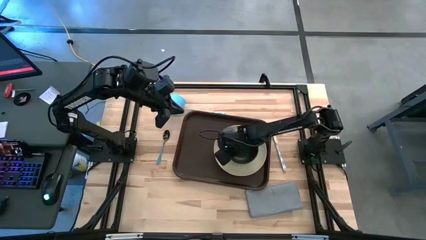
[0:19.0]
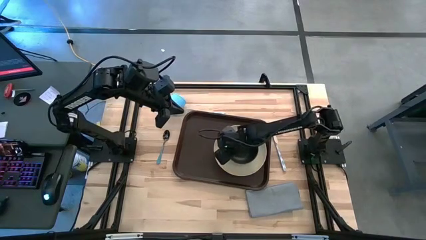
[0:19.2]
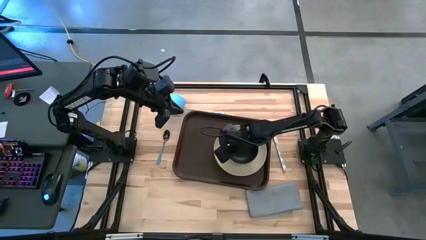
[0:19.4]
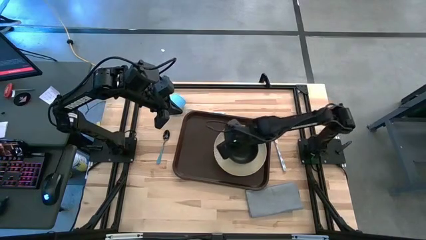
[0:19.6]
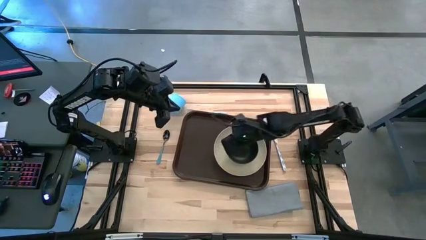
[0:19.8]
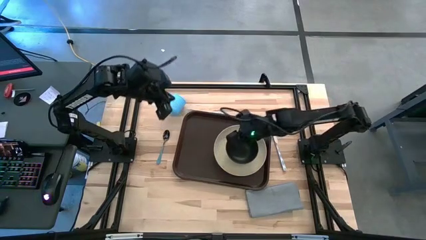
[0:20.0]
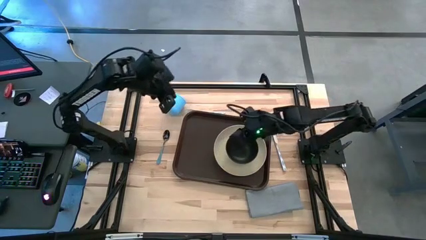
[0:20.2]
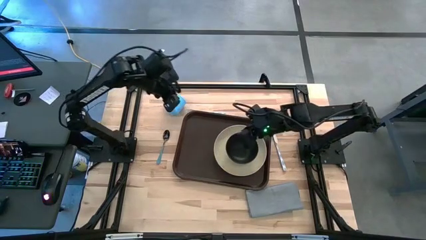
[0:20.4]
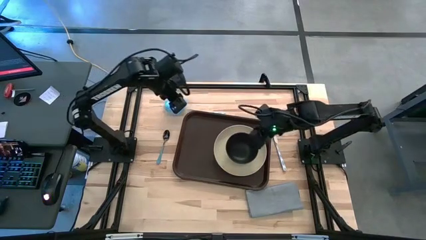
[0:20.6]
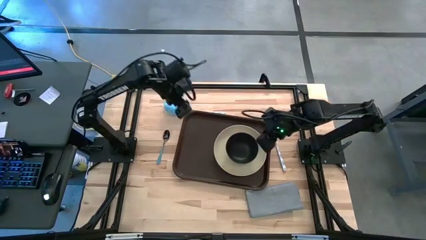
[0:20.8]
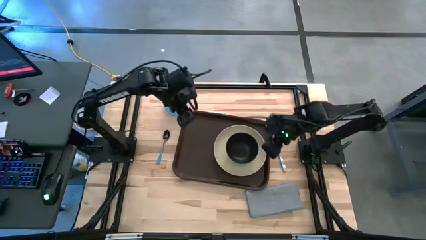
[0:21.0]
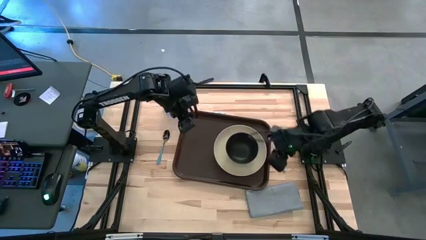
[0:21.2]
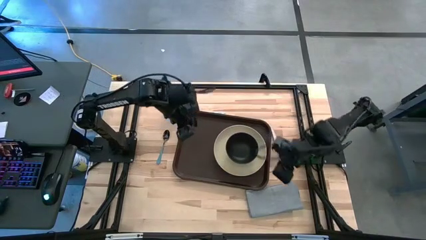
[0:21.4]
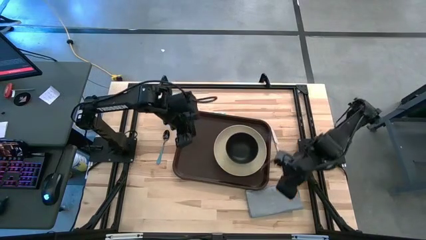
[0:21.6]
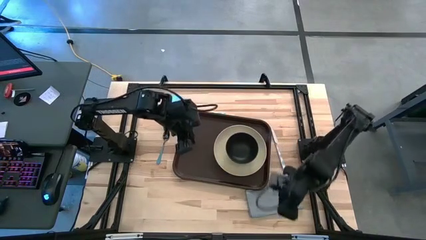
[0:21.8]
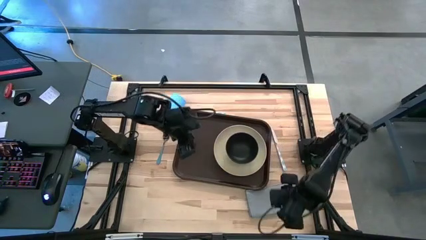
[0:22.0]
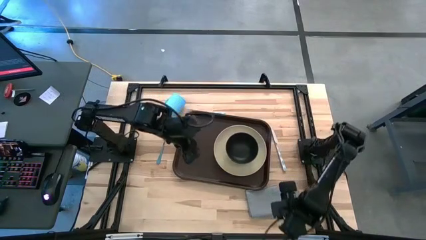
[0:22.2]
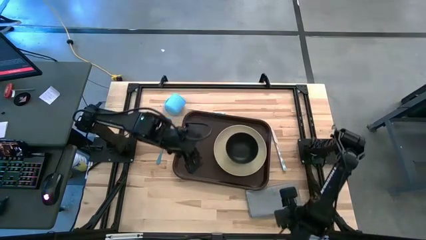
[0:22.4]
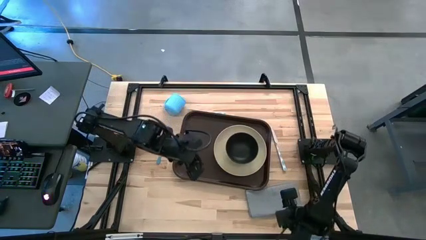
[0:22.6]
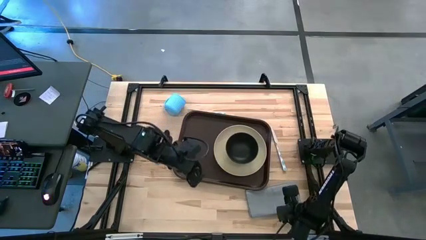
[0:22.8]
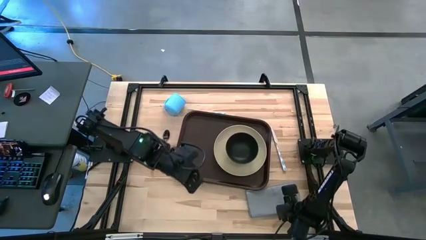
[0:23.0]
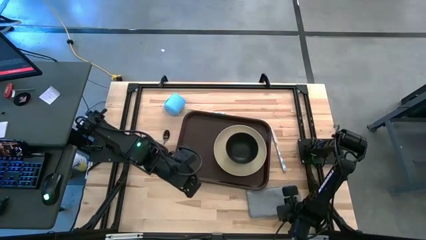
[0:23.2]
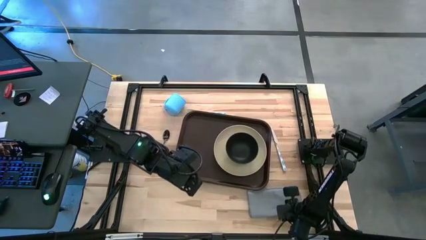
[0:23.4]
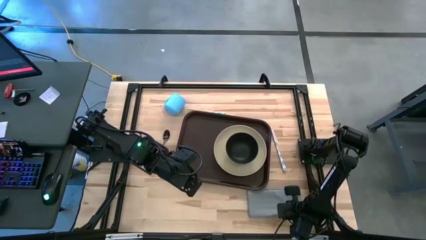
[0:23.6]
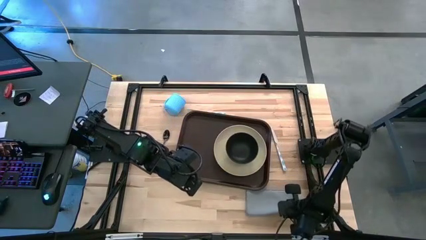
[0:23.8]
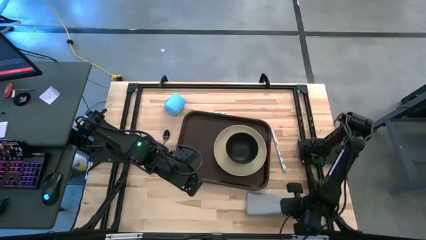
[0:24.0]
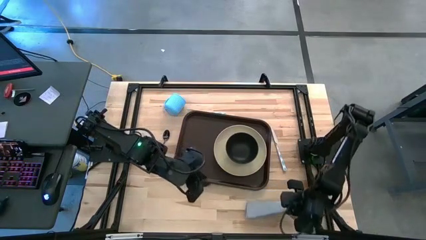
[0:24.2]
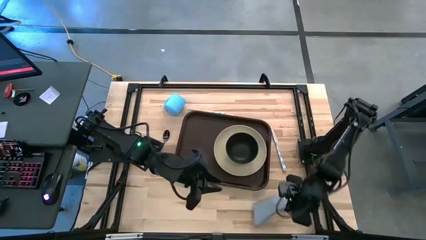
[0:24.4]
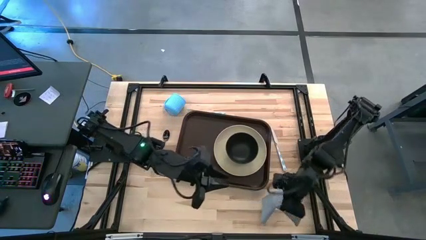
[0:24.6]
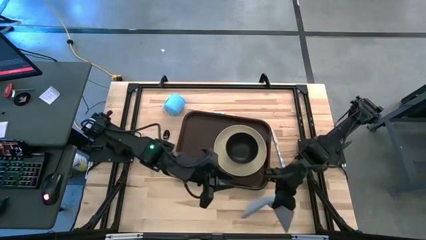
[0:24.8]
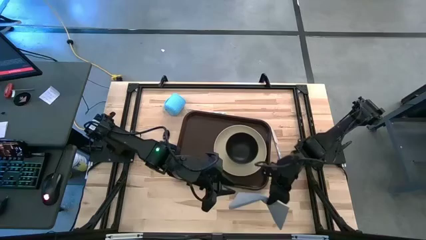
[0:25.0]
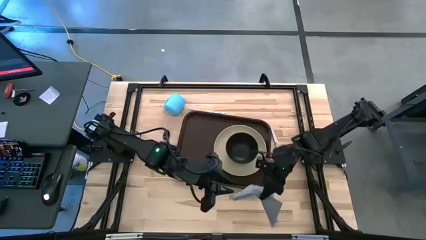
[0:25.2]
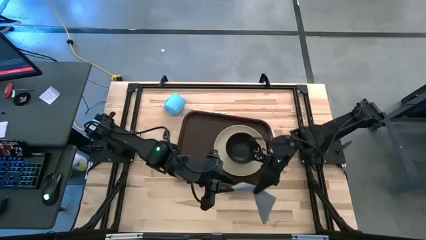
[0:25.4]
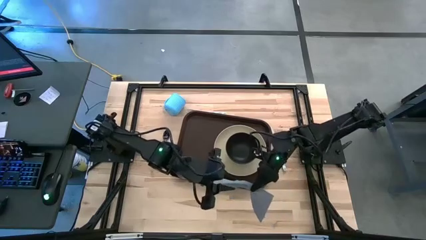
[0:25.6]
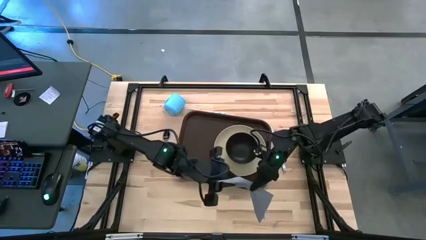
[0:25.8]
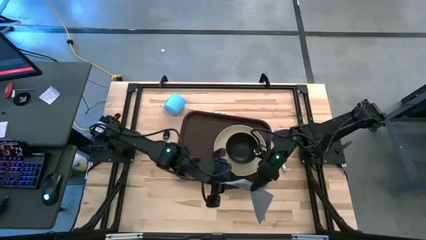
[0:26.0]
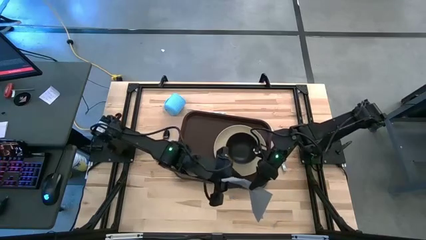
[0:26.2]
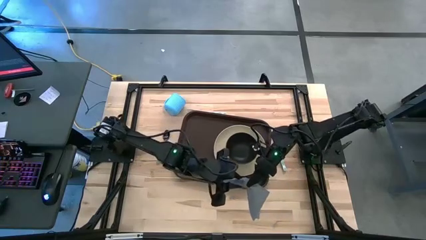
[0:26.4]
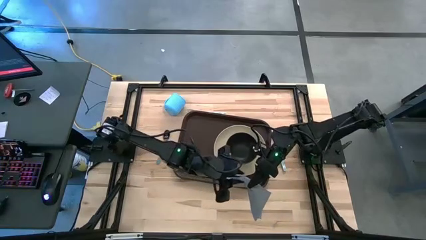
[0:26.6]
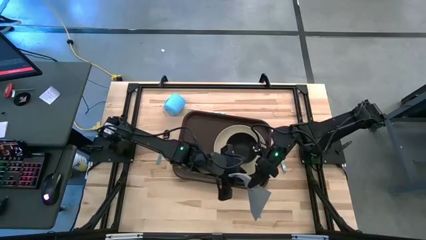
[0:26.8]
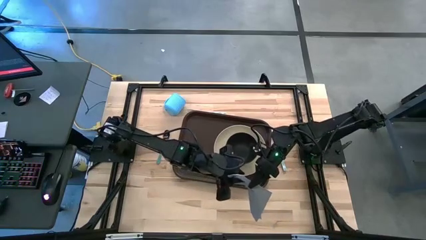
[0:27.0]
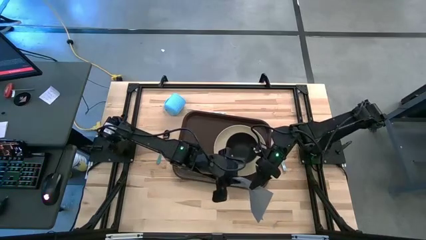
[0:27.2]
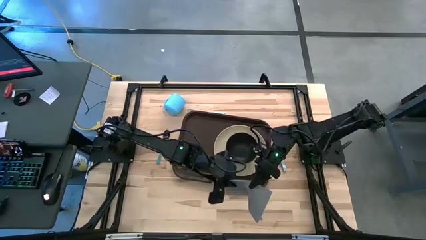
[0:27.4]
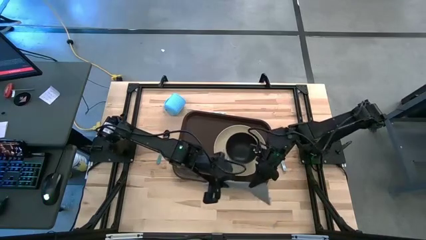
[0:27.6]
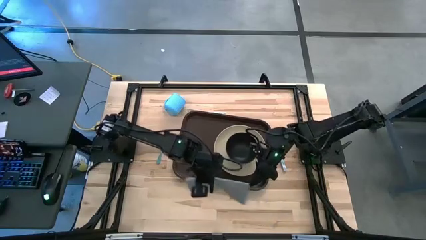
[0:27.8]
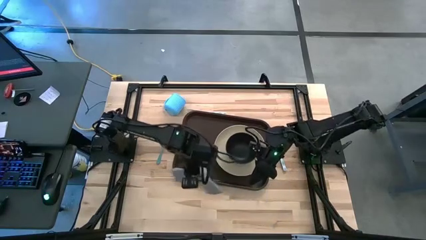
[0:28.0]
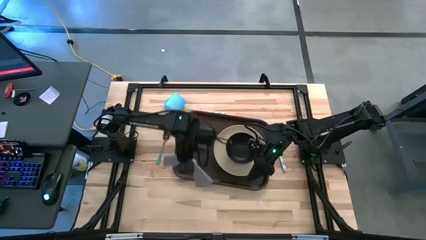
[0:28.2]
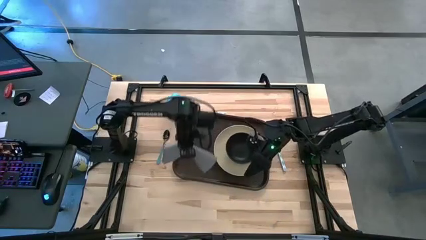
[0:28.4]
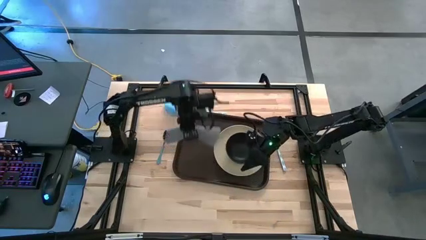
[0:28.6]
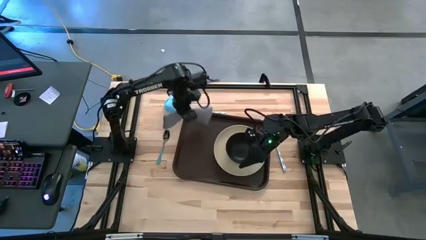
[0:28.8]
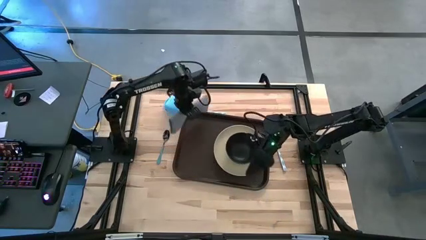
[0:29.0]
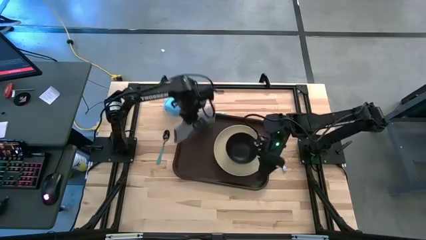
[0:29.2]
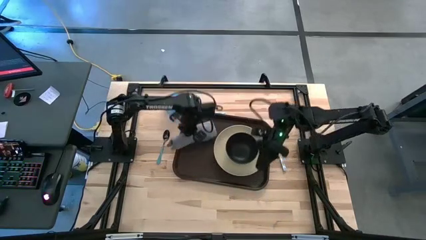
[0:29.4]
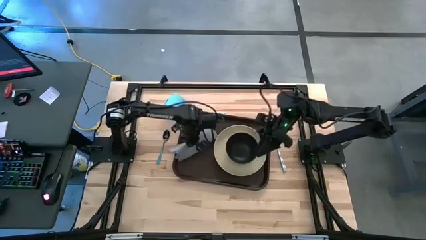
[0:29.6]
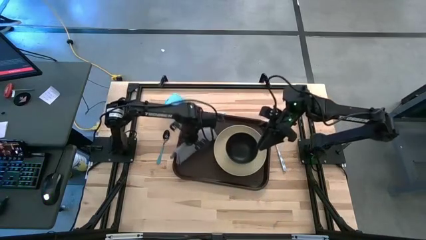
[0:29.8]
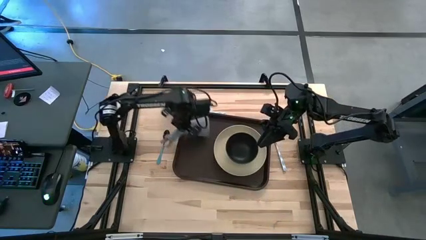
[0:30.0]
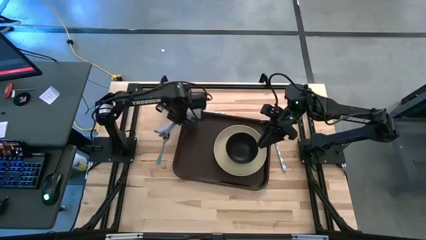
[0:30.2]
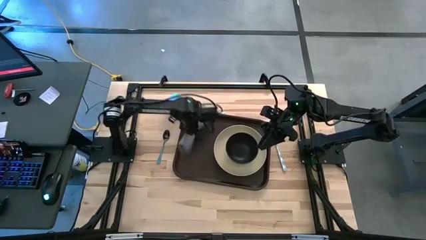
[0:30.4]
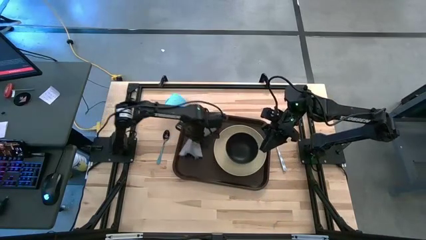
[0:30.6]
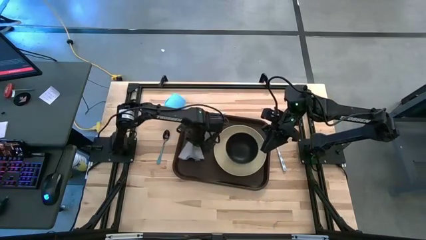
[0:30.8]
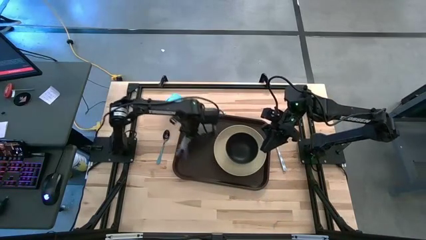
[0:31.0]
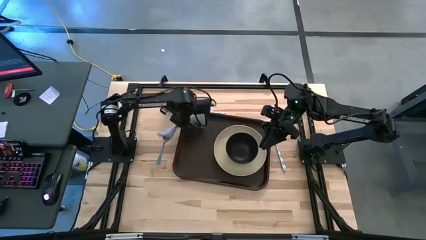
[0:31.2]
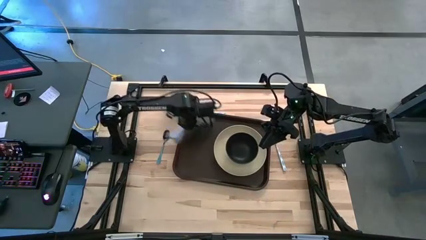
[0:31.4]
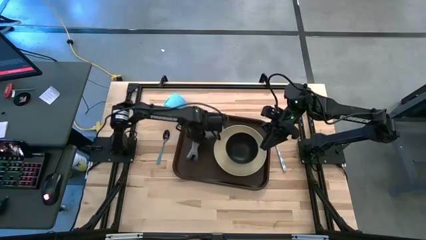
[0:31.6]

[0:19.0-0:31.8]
Task: Set up tray
Put the gray napkin on the dark brown serving tray to the left of the brown plate

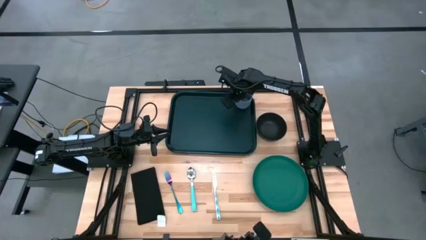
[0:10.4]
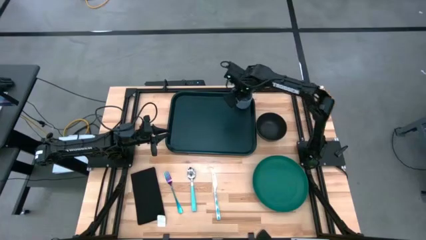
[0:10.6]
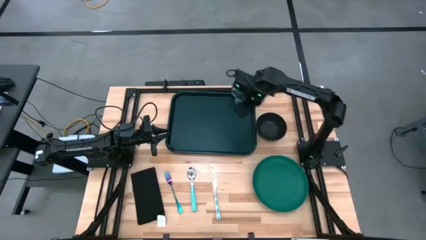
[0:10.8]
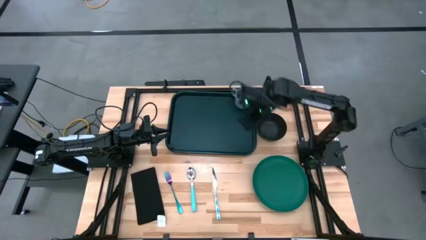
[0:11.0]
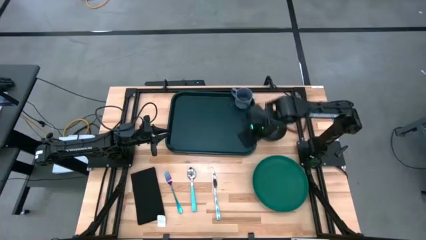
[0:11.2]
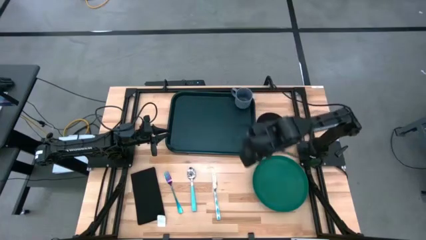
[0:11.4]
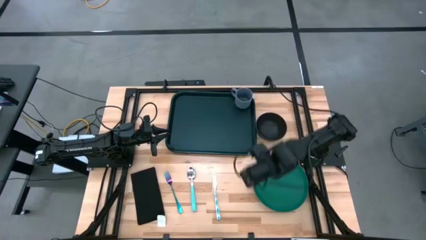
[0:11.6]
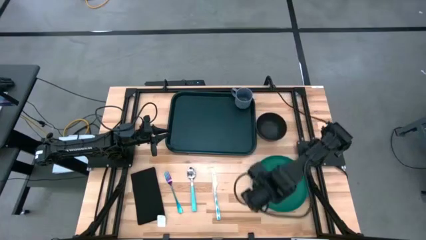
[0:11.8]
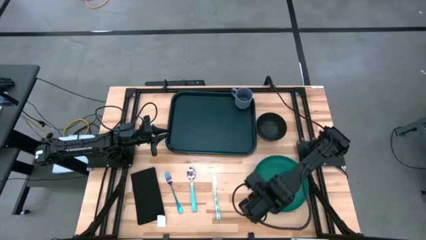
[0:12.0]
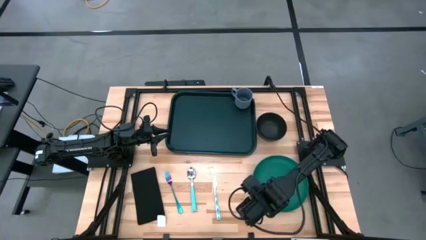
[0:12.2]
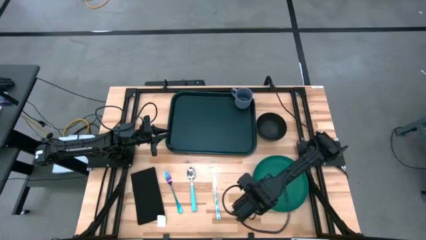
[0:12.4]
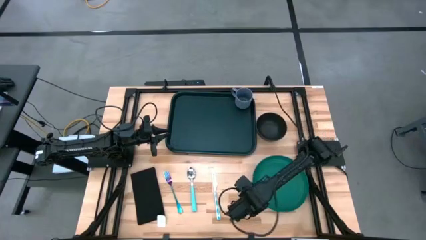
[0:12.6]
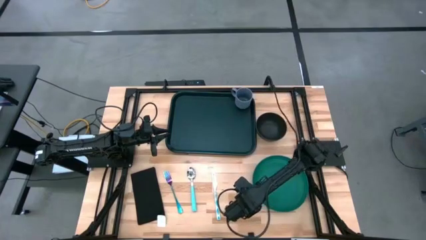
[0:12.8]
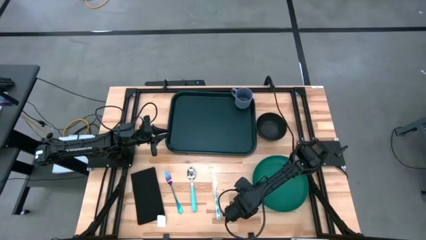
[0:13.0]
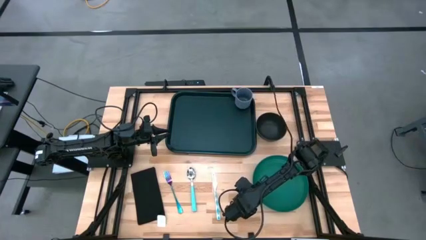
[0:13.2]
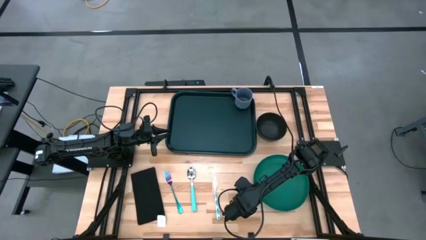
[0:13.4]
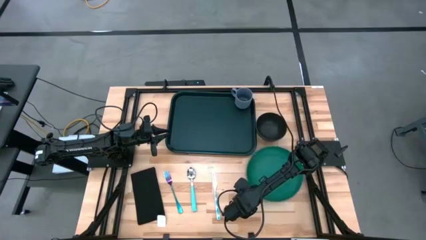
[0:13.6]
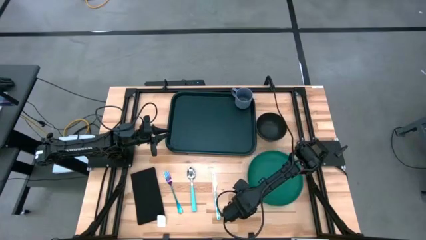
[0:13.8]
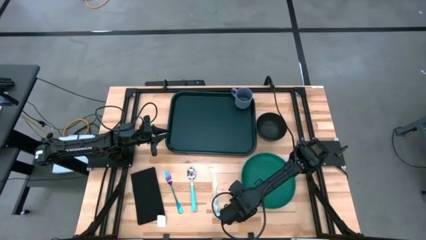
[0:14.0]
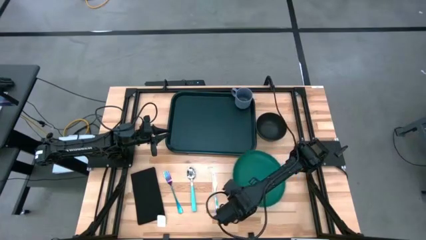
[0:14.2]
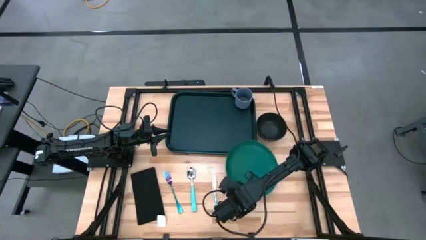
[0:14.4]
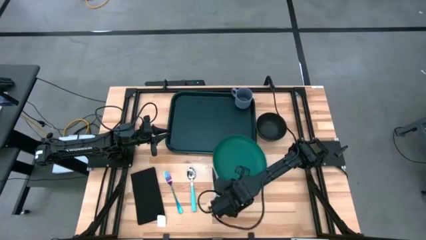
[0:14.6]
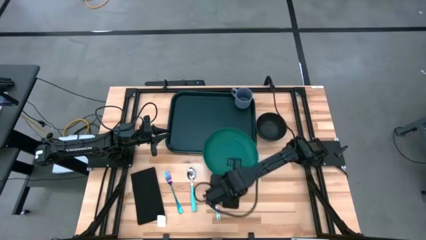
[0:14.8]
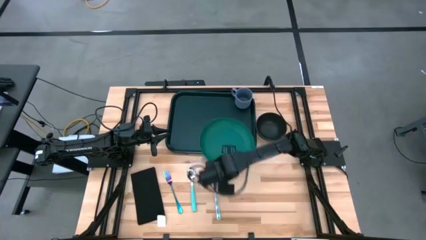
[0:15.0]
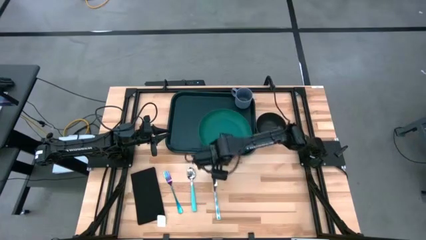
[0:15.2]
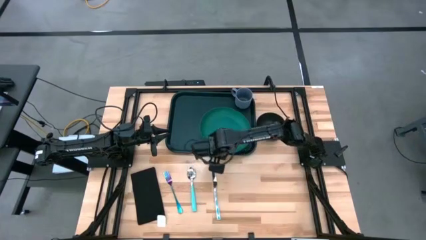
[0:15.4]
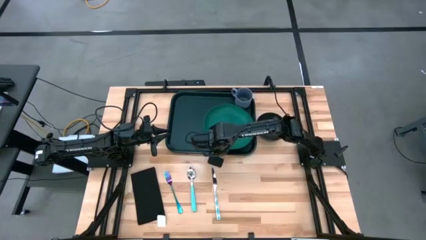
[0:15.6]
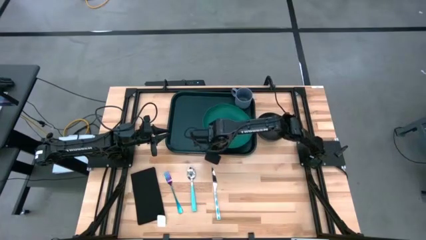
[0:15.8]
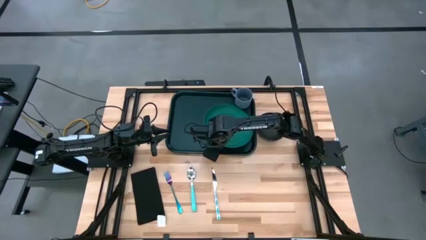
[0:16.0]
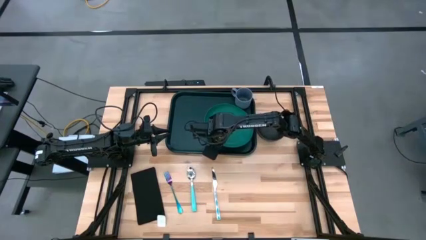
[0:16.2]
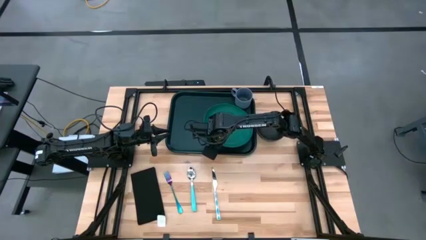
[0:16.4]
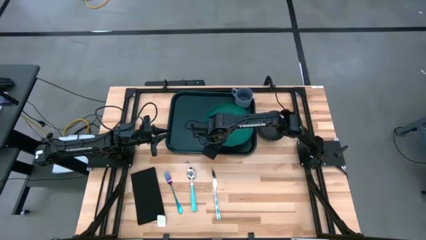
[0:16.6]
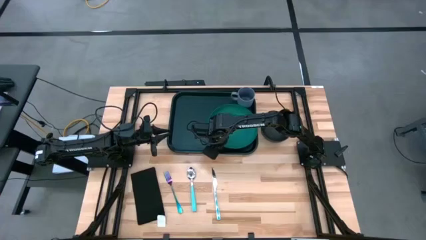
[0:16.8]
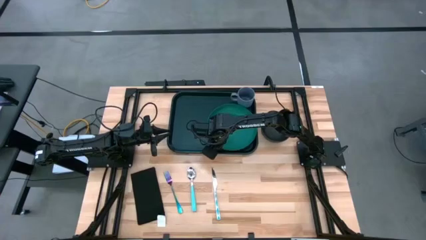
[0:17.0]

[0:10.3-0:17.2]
Task: Set up tray
Put the green plate on the black tray at the bottom of the gray mug
